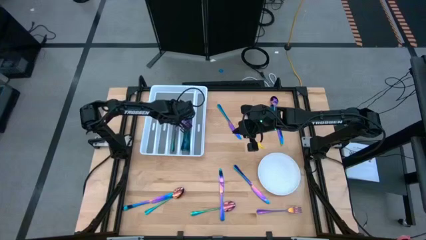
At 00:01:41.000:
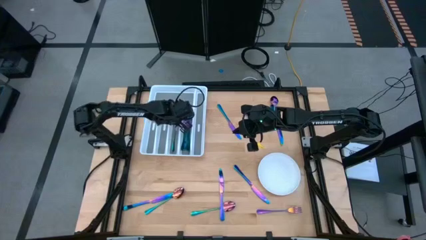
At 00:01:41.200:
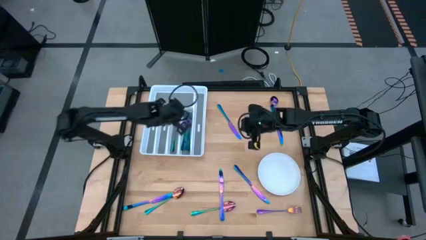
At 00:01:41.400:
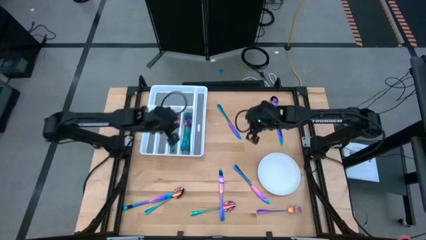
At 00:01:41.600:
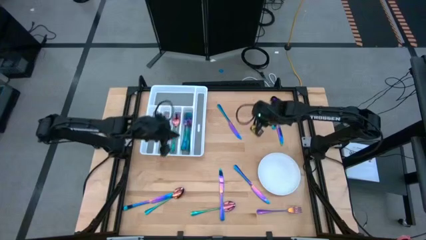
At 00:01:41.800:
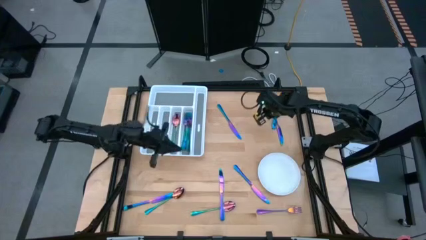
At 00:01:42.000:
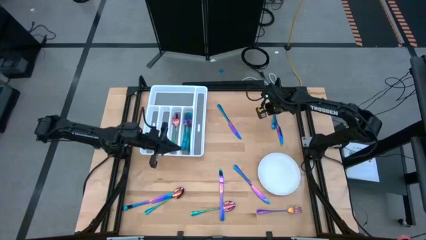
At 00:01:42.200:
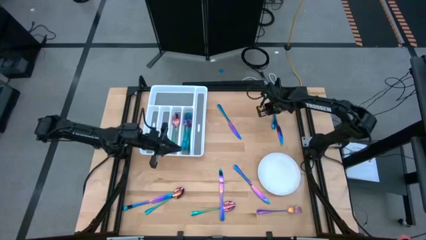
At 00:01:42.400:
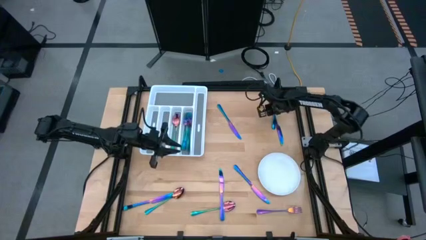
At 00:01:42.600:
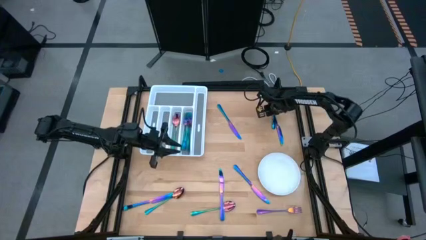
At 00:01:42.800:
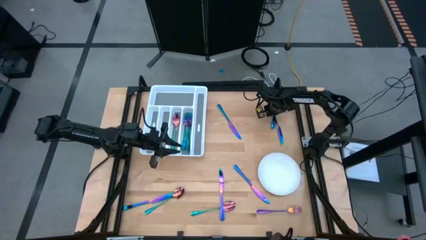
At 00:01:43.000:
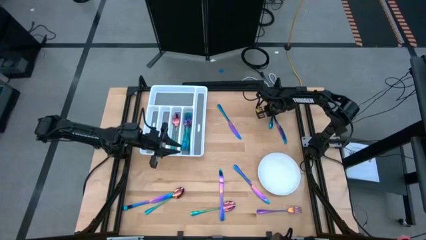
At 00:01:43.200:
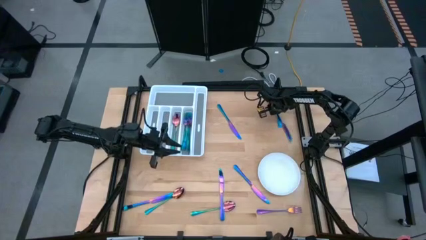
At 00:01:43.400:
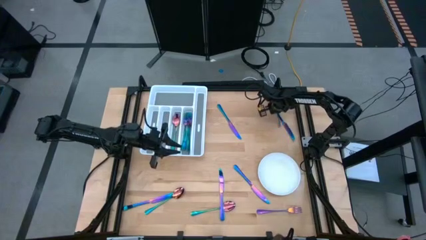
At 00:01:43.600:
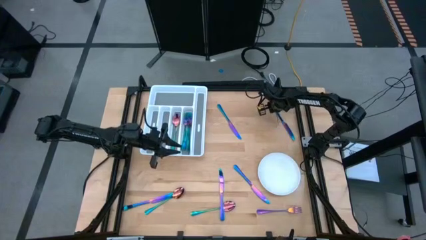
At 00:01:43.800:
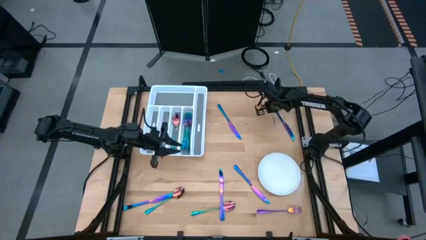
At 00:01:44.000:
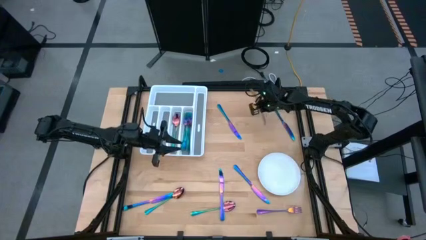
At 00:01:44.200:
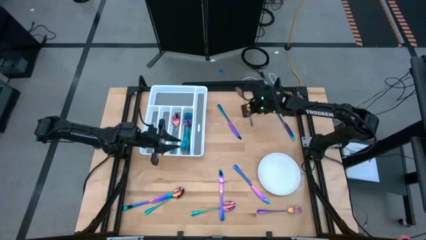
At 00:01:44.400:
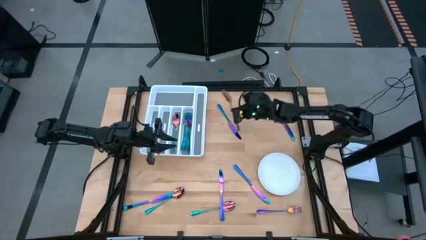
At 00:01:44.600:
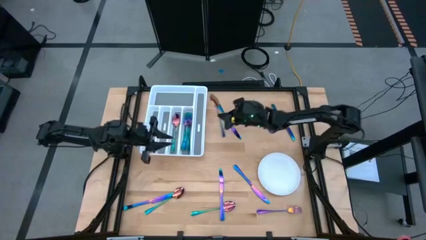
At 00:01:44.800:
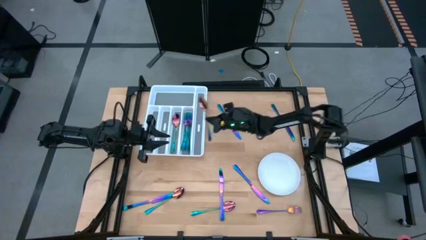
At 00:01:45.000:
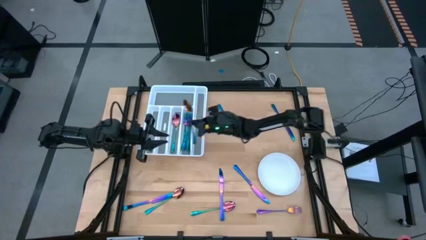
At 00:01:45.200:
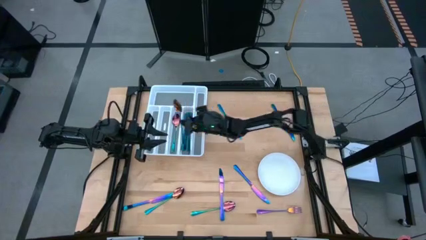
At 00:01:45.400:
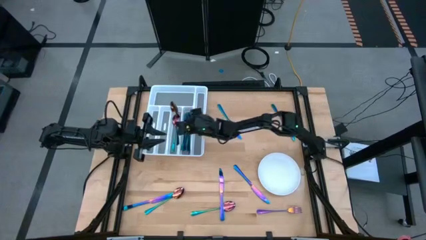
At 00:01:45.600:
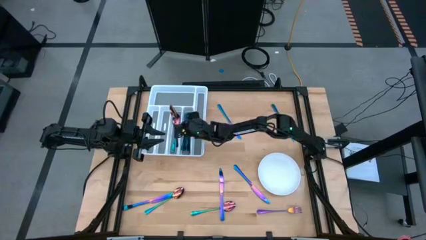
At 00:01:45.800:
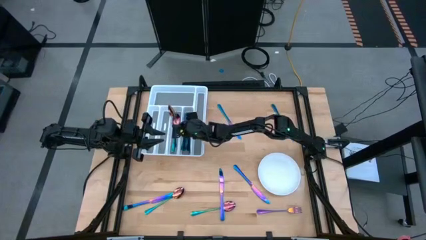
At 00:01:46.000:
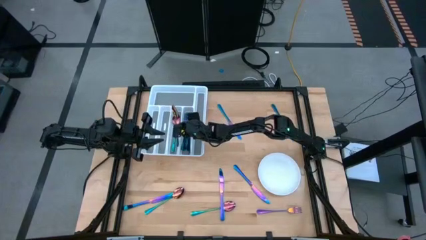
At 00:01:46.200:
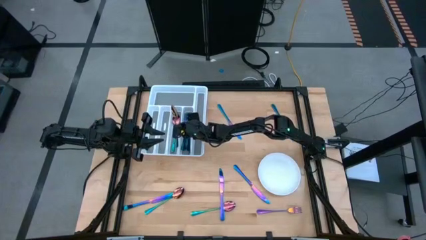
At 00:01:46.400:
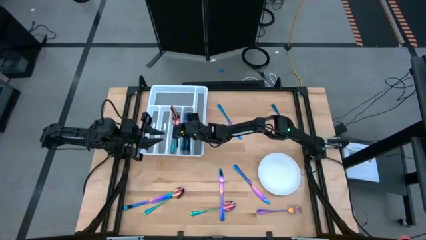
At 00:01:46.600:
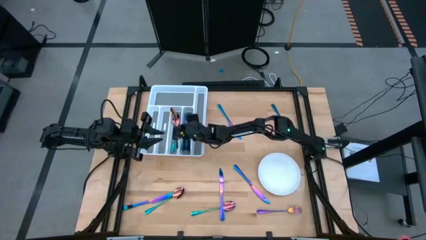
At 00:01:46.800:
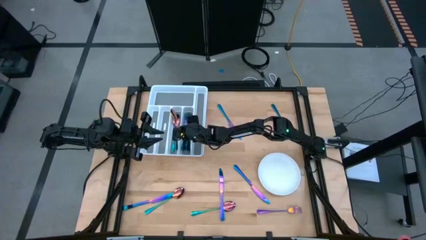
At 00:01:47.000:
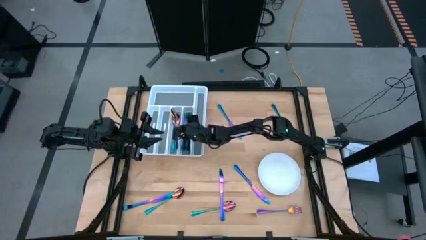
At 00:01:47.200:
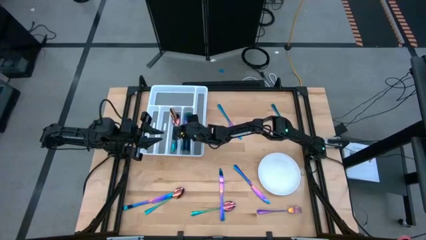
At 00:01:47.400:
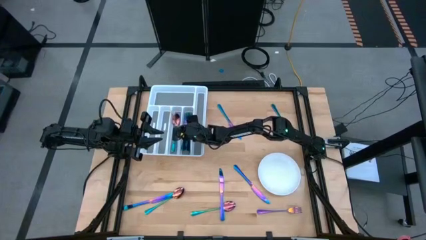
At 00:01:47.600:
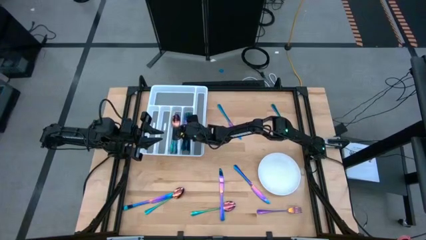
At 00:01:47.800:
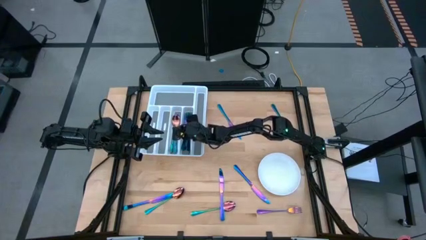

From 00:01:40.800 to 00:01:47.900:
Task: Sort silverware
Put the iridescent spoon into the white silverware tray

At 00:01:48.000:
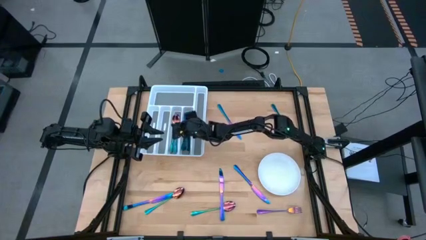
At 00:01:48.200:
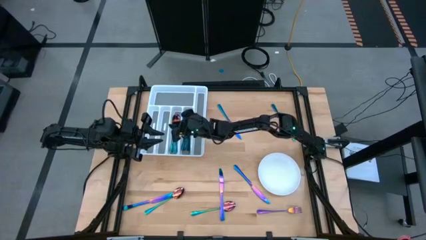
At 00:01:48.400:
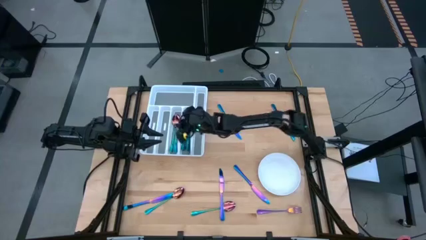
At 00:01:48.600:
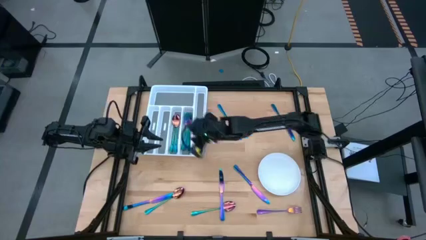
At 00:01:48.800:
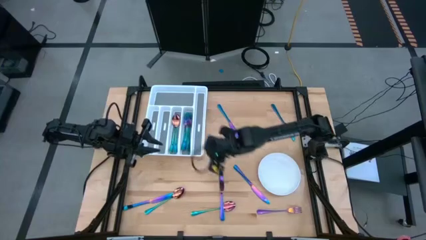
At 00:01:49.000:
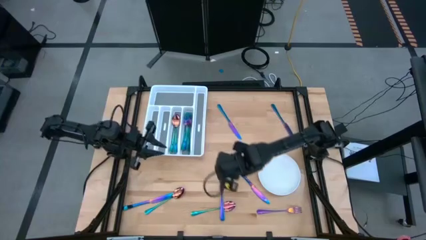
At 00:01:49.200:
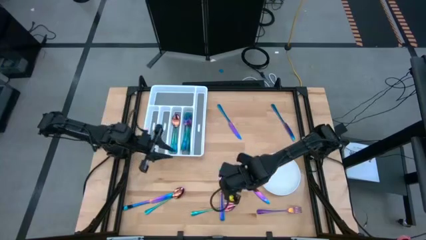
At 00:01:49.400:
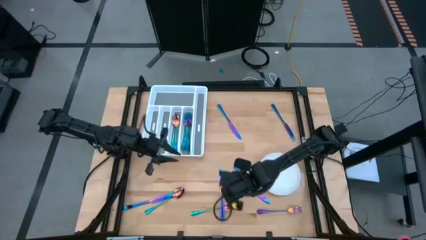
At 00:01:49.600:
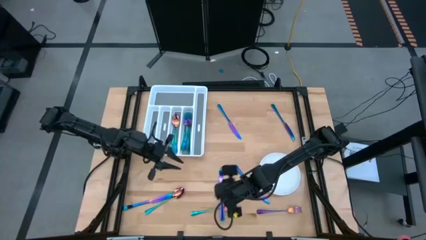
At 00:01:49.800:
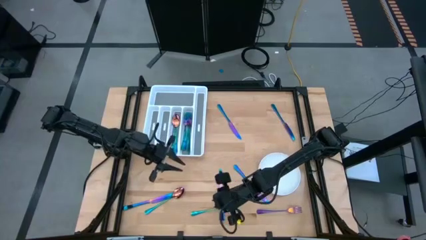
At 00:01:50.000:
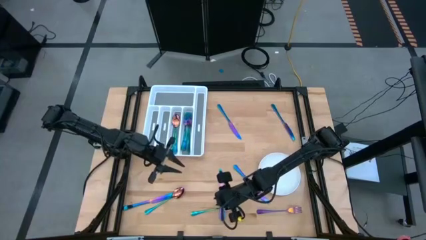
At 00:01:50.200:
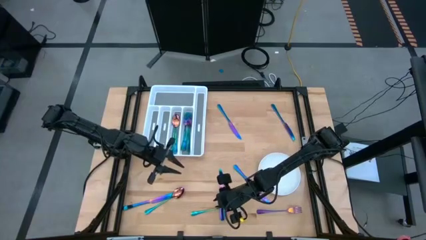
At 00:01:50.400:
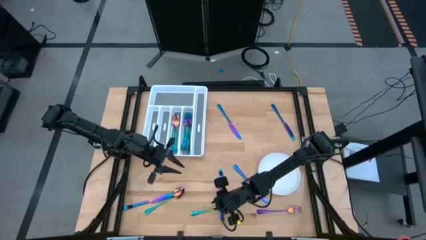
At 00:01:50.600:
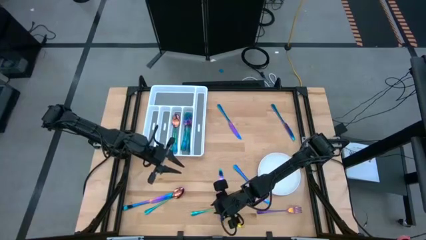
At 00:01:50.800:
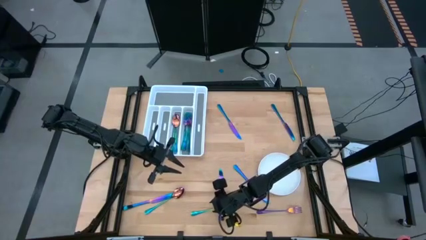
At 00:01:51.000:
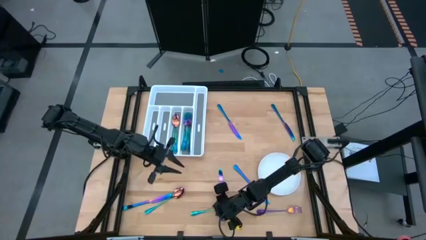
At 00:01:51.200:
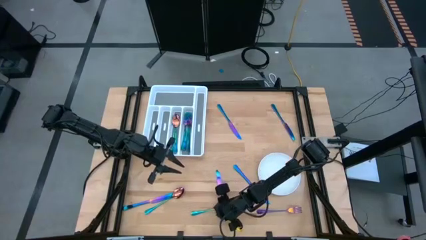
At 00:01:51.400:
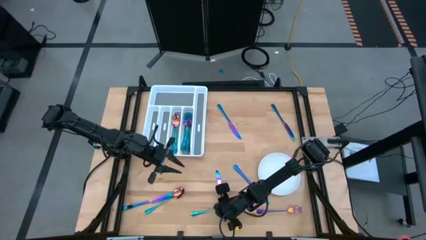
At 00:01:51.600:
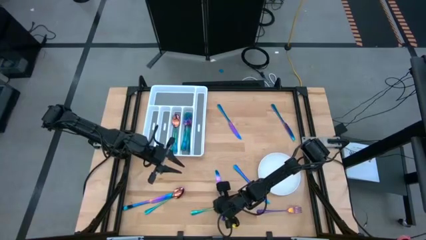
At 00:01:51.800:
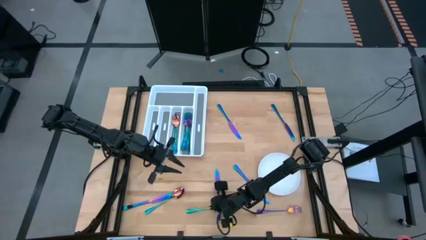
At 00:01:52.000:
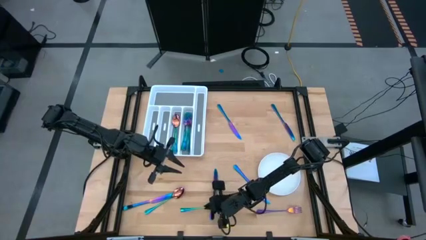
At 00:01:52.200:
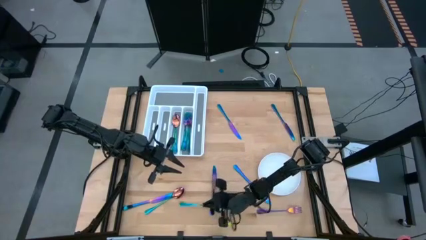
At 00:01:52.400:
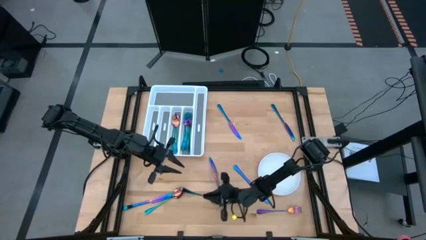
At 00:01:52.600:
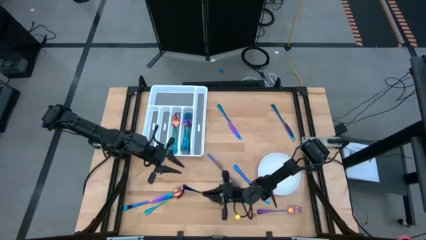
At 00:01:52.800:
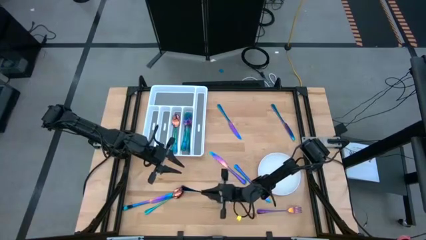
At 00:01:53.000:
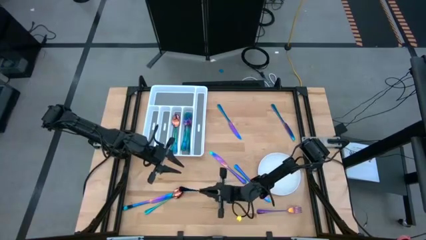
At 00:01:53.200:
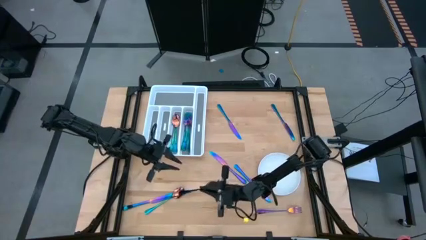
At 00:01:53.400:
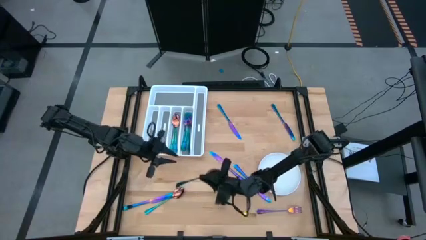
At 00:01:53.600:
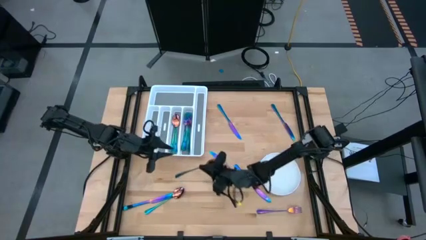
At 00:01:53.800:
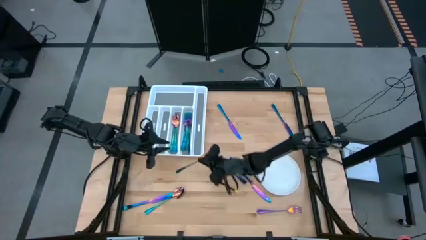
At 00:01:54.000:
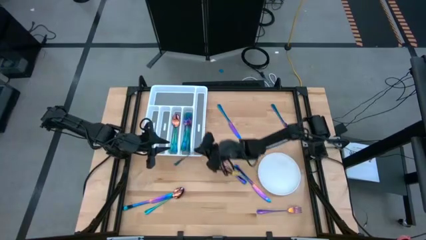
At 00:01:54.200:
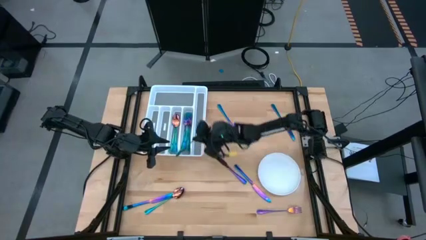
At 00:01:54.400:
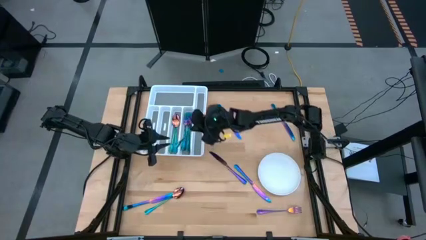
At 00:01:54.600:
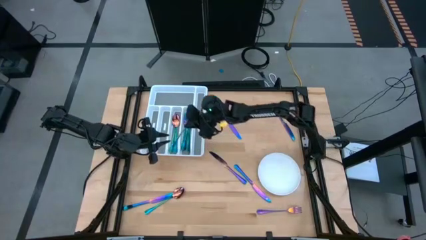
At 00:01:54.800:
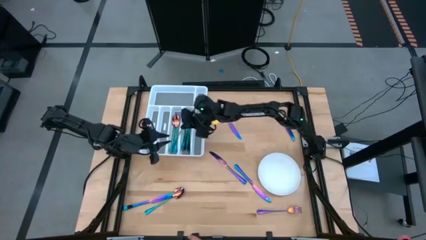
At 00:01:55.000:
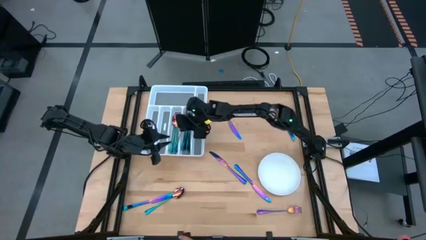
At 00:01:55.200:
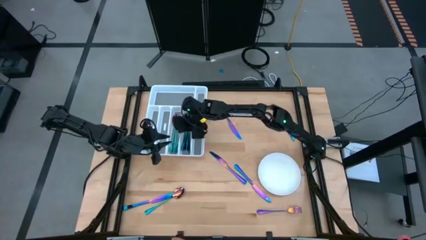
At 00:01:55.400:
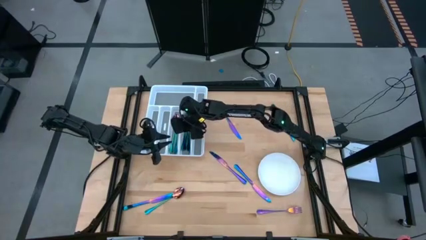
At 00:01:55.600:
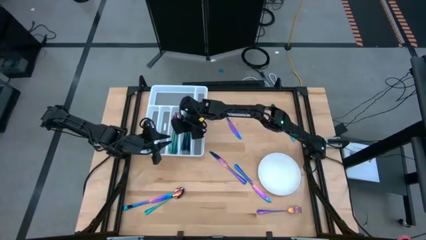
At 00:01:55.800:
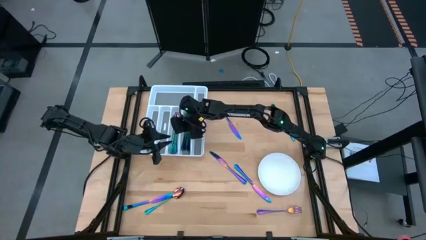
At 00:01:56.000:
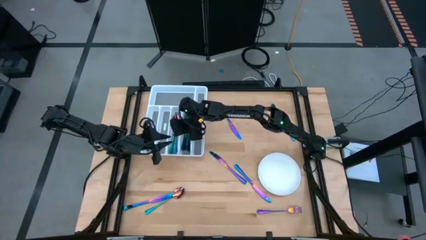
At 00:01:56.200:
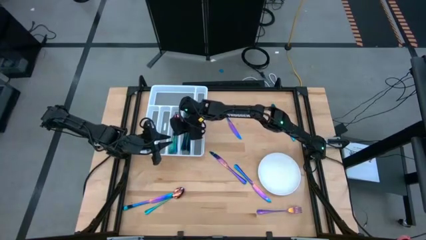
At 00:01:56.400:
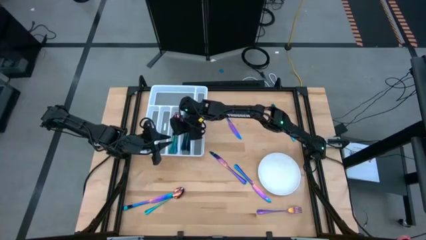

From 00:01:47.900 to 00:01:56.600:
Put the iridescent spoon into the white silverware tray
